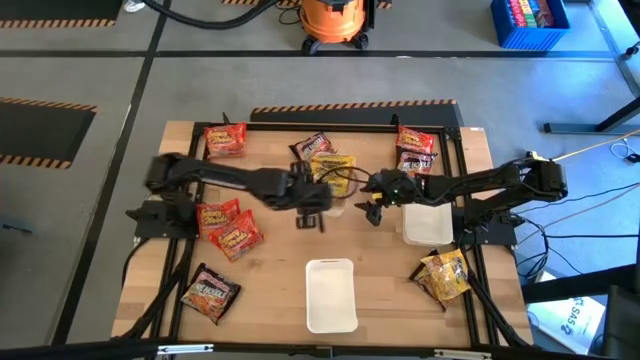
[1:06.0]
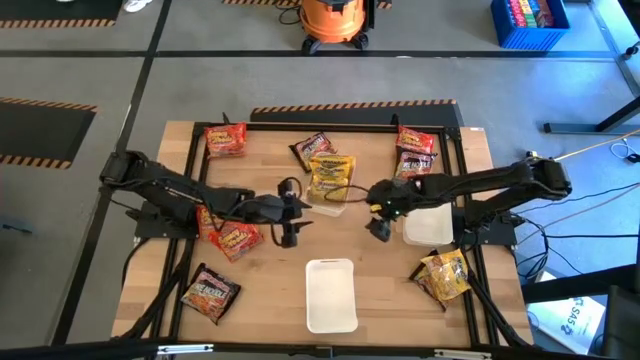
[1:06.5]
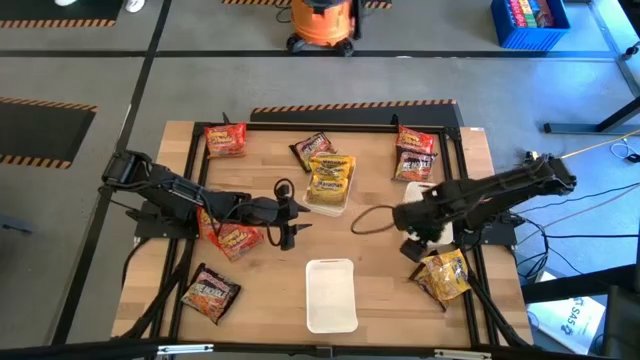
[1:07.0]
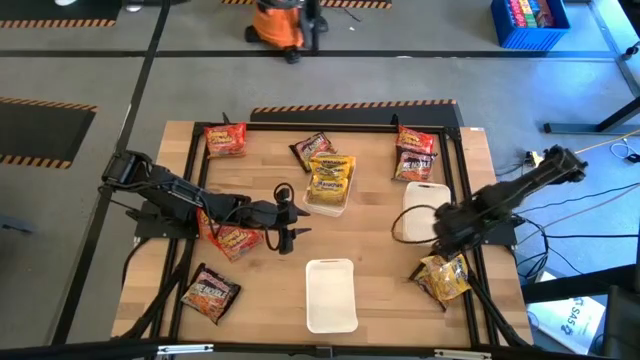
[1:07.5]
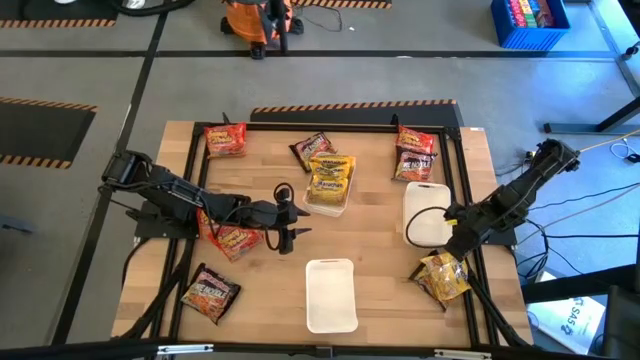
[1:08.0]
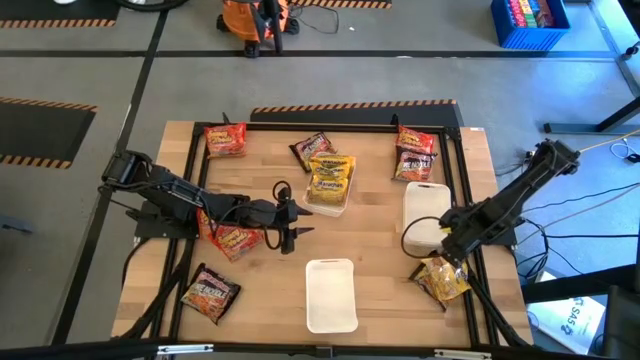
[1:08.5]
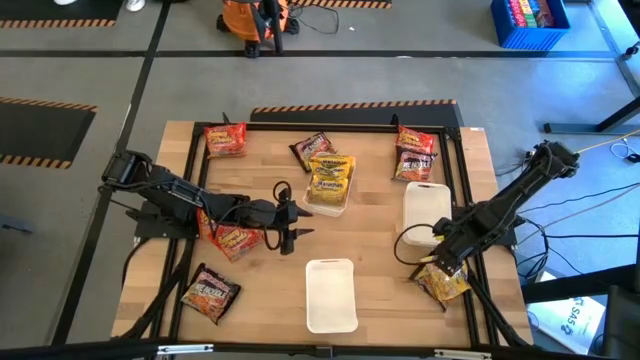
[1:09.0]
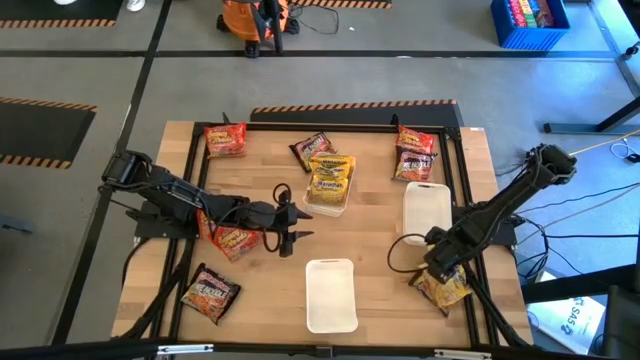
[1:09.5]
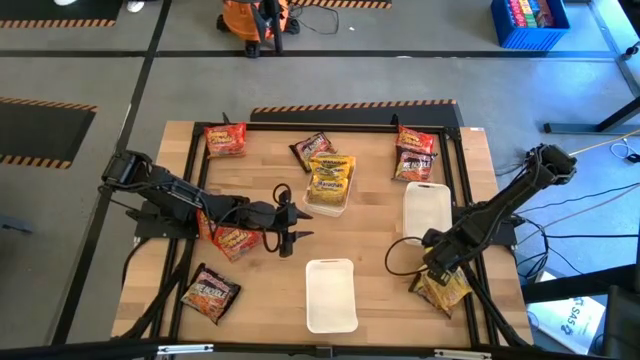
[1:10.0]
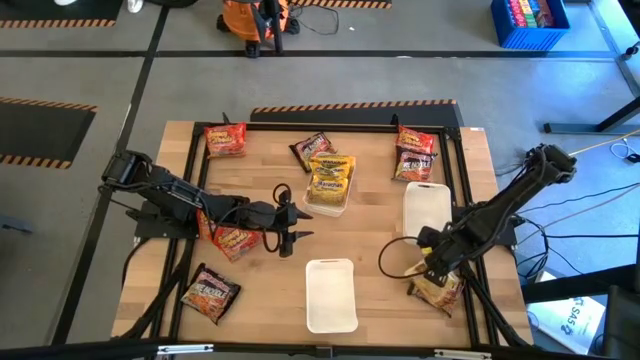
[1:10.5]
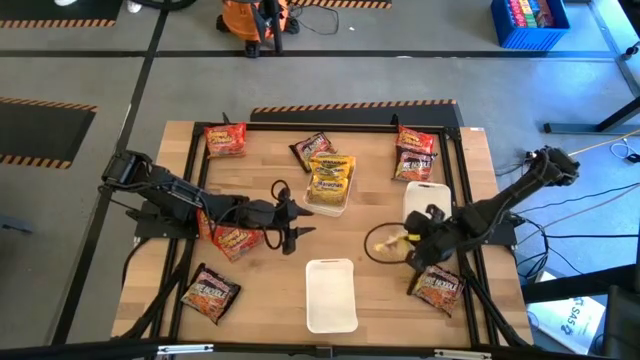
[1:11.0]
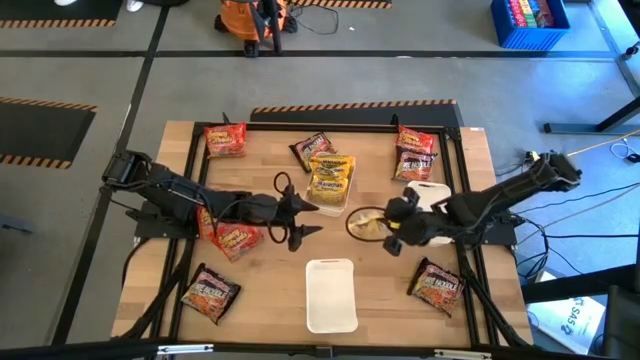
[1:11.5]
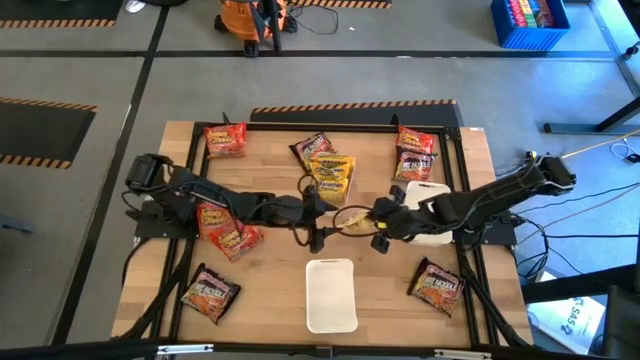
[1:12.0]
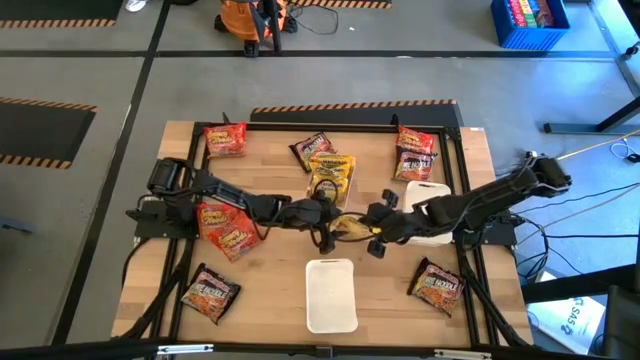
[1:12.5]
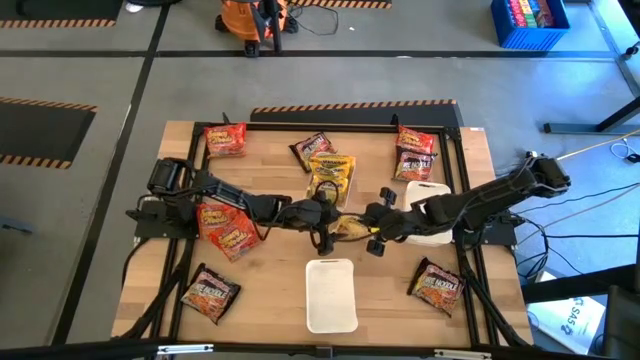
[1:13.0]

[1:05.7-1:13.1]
Task: Sort Maruchan noodles
Put the yellow noodle pack in the top left white bin

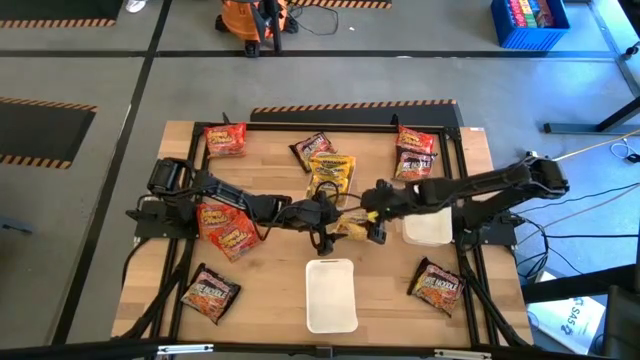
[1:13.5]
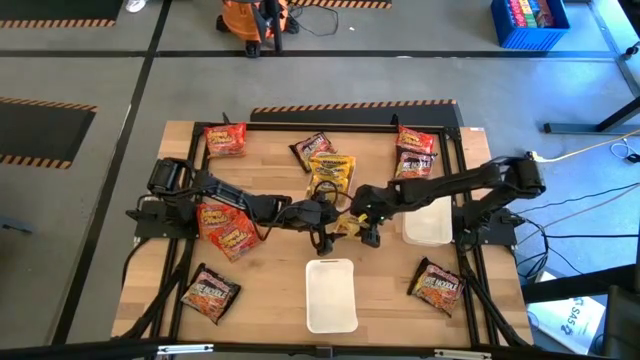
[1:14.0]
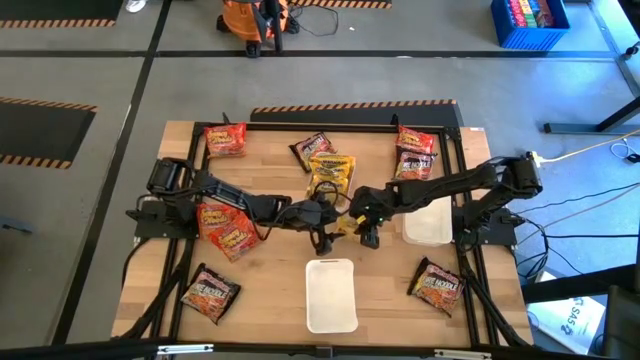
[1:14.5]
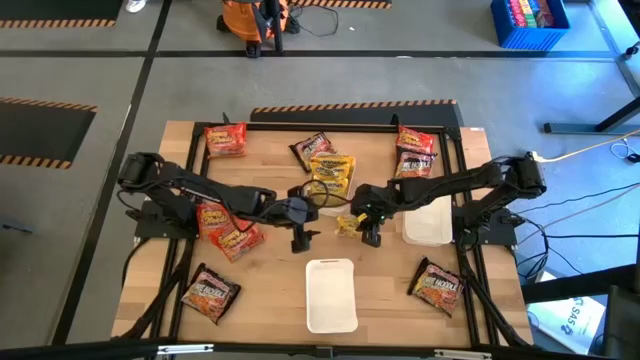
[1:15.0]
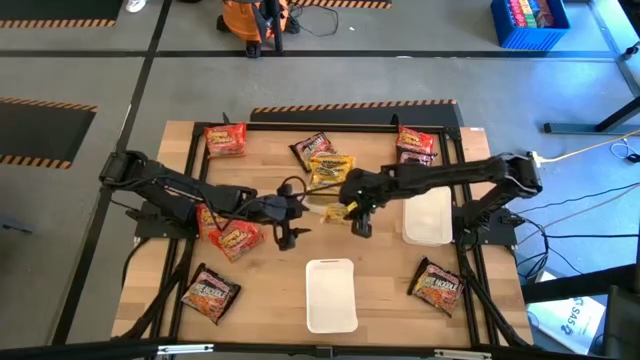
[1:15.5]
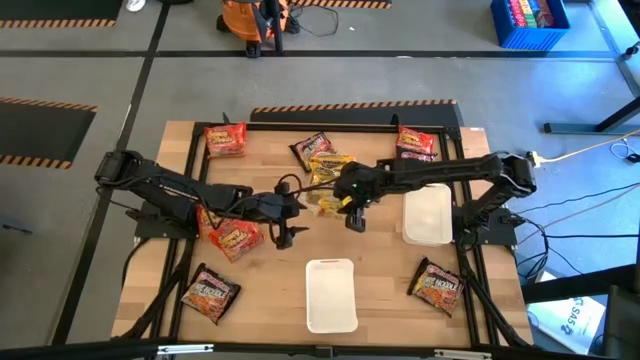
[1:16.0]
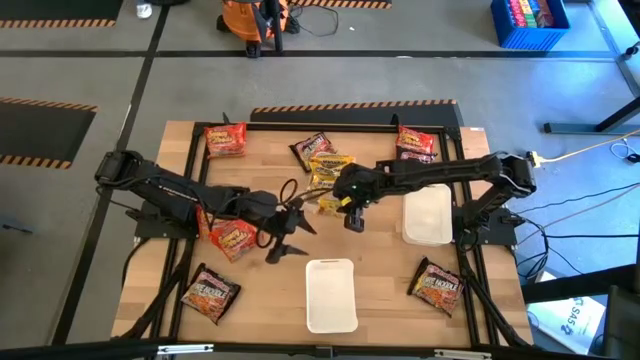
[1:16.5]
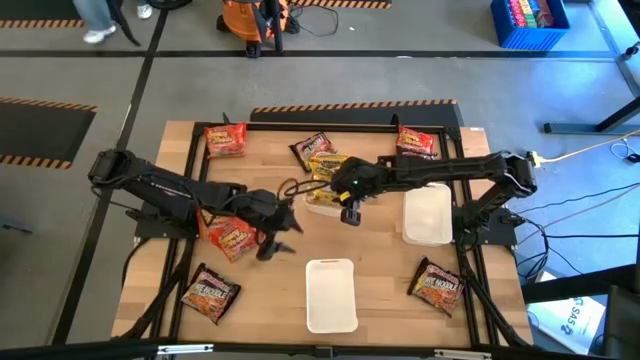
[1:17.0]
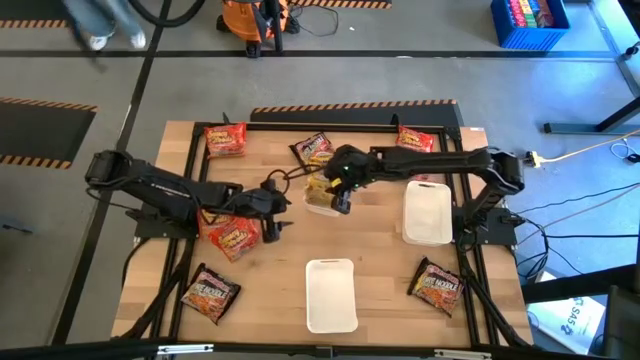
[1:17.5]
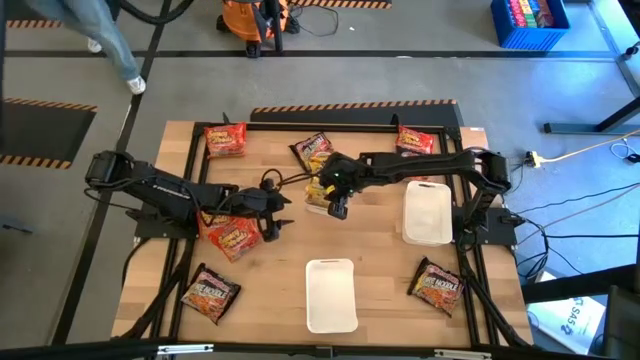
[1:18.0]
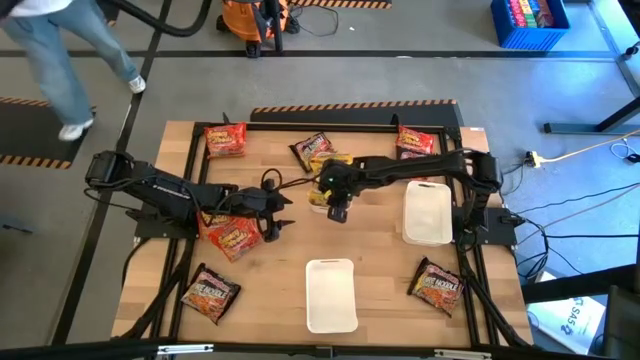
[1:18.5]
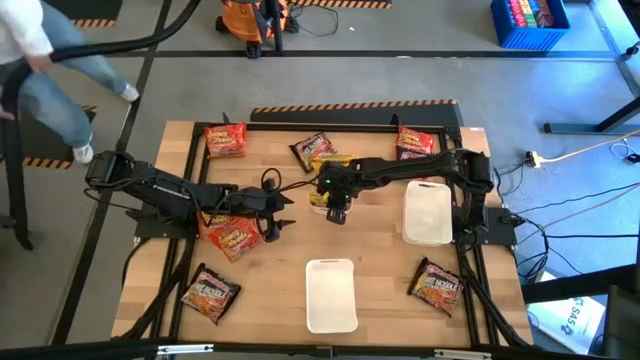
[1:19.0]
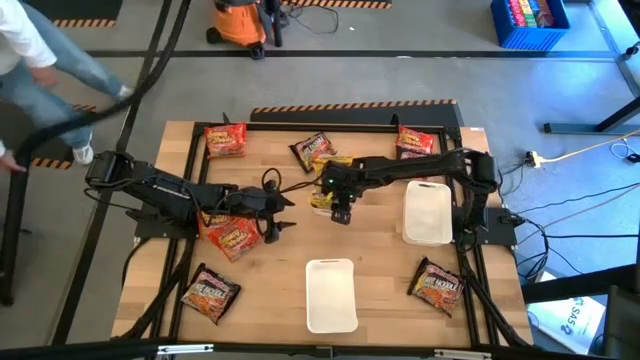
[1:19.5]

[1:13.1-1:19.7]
Put the yellow noodle pack in the top left white bin

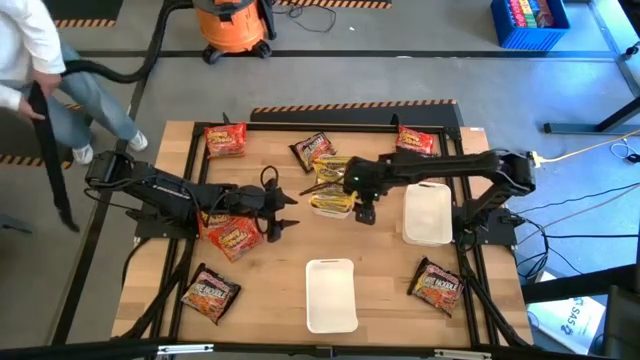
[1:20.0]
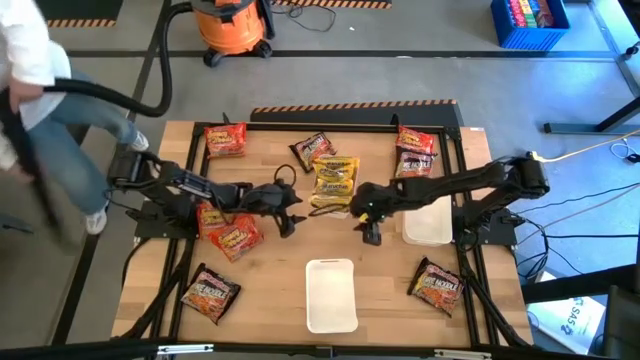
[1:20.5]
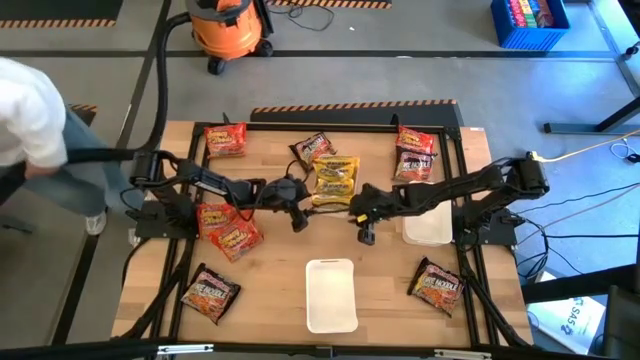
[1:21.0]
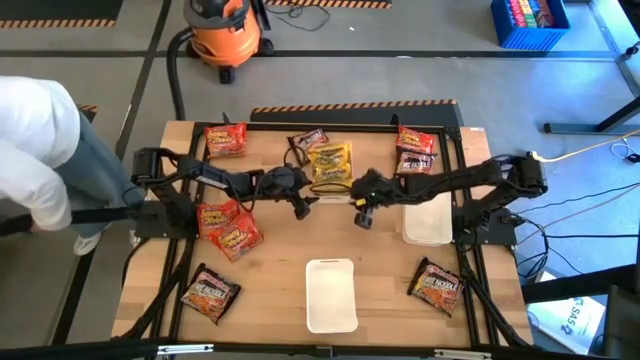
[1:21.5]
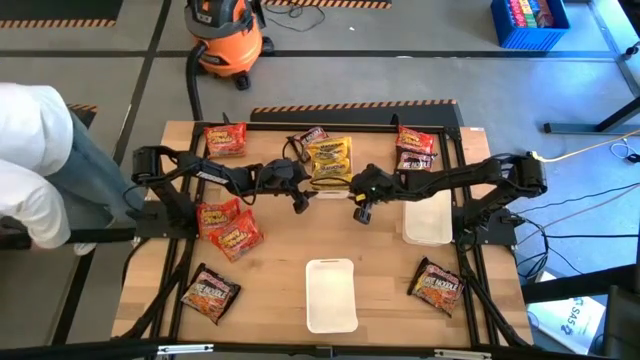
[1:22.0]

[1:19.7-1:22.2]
Move the top left white bin to the top center of the table

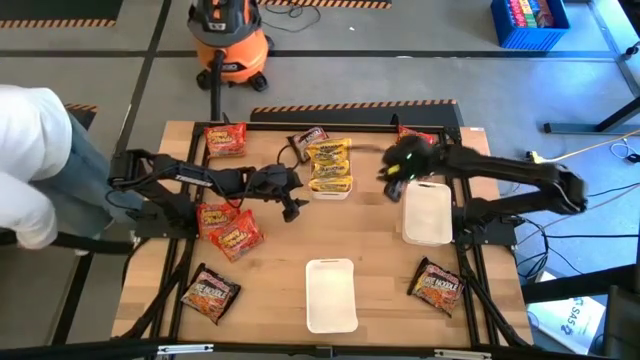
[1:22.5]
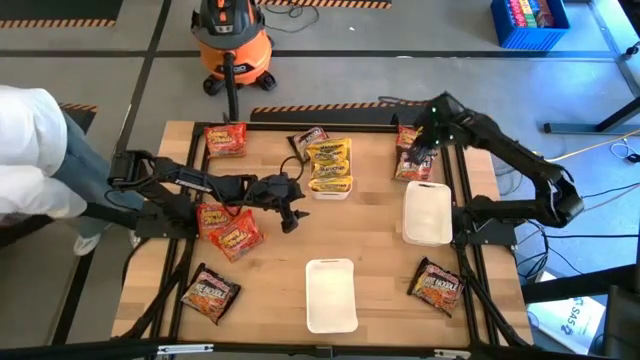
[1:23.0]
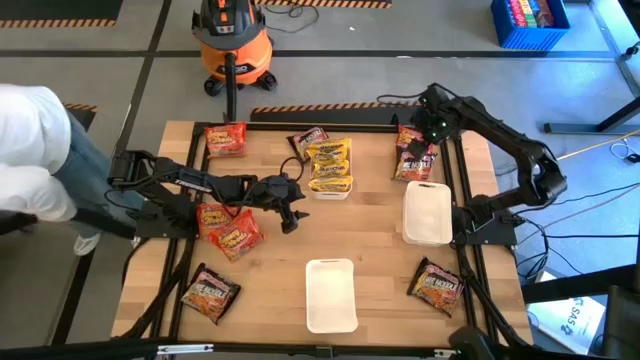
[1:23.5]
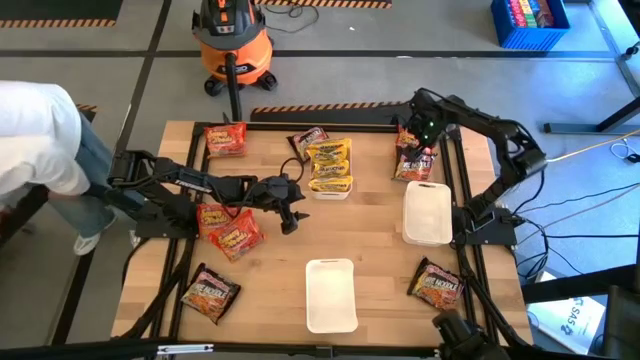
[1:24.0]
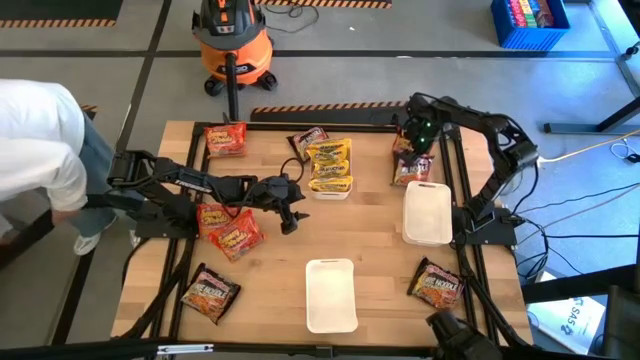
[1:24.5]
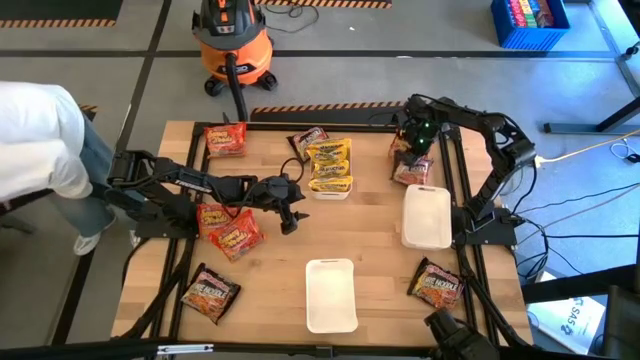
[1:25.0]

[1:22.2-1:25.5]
Put the top right black noodle pack into the right white bin

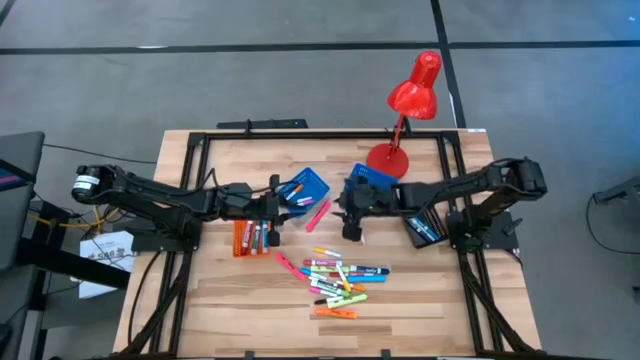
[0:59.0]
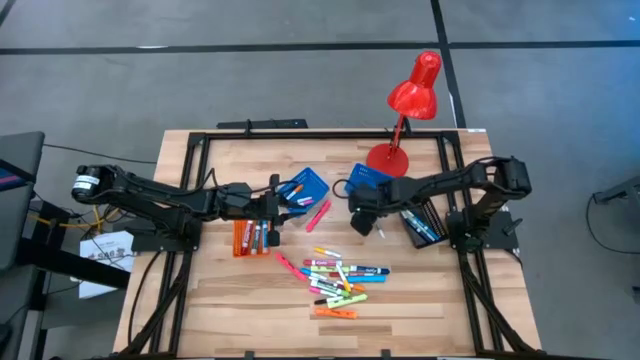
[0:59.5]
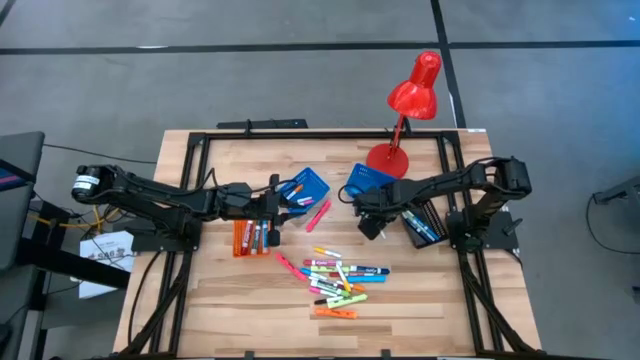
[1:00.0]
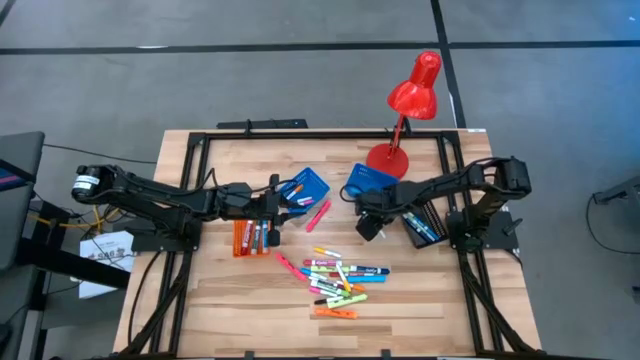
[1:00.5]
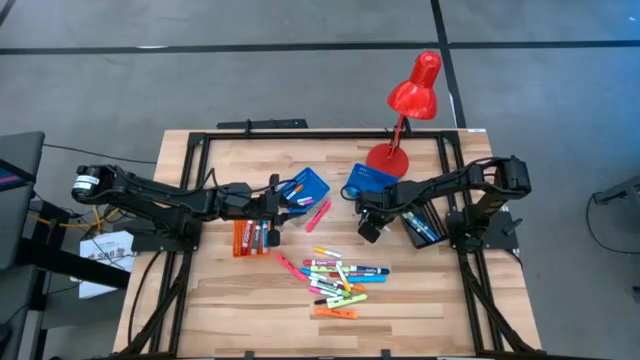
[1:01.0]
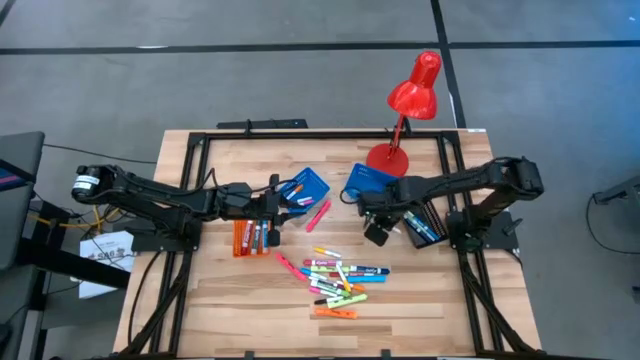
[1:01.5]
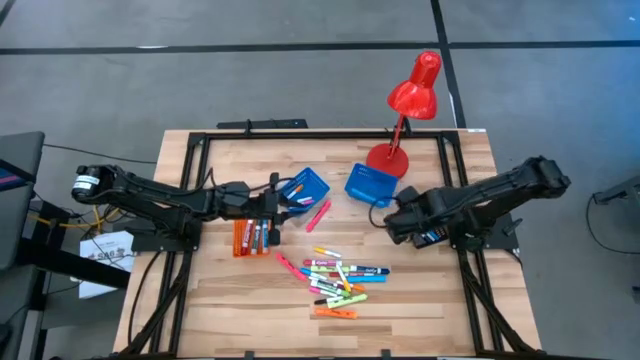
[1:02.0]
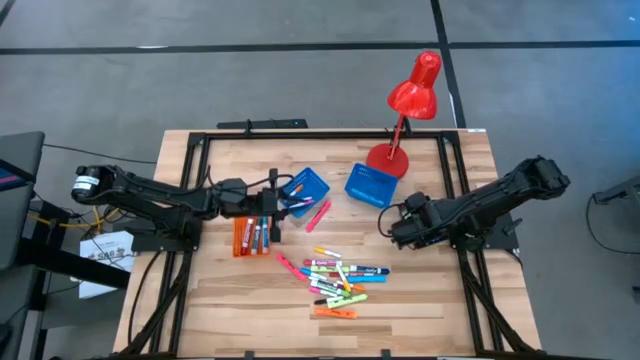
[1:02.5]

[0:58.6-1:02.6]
Task: Pick & Place Markers
Put the small dark green marker pen into the black bin
